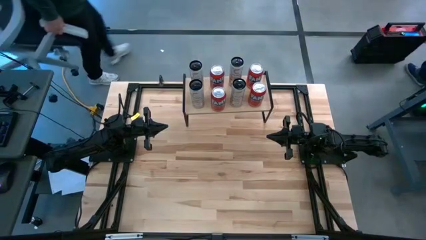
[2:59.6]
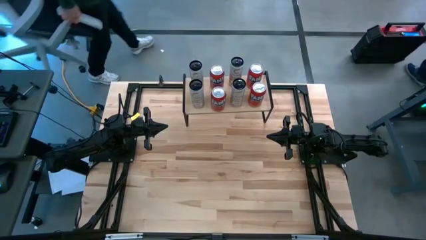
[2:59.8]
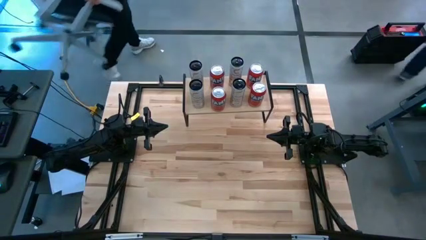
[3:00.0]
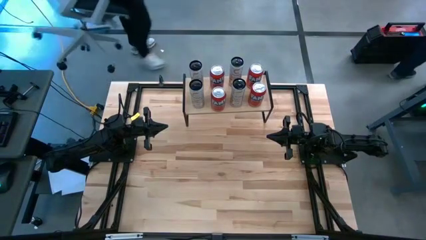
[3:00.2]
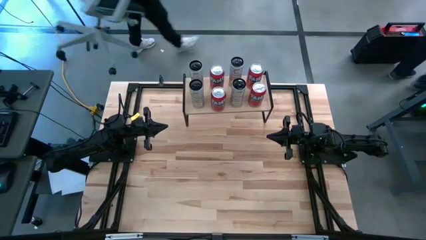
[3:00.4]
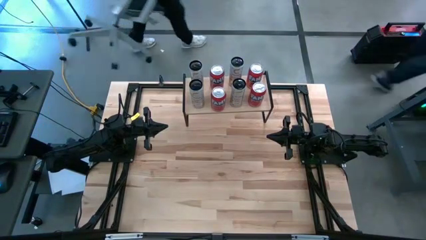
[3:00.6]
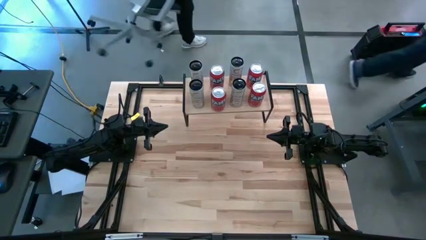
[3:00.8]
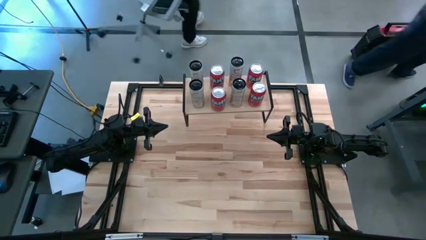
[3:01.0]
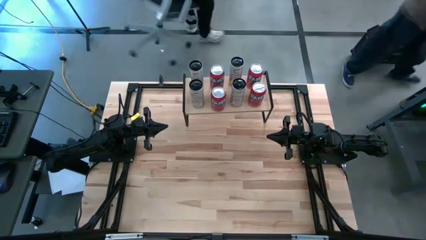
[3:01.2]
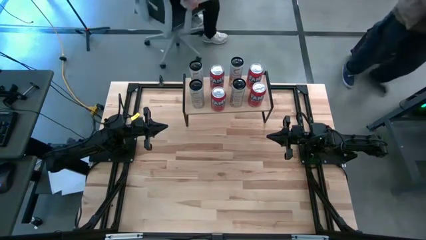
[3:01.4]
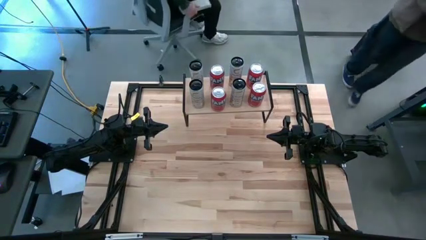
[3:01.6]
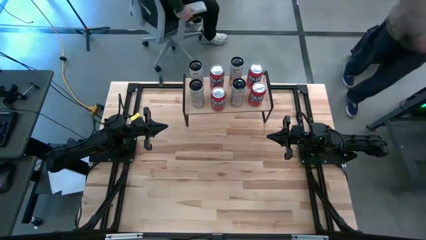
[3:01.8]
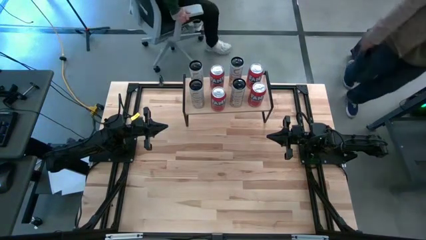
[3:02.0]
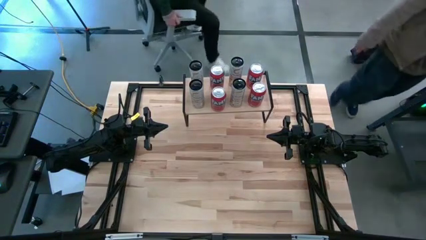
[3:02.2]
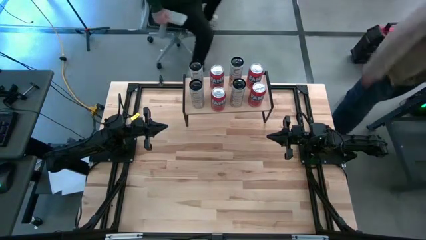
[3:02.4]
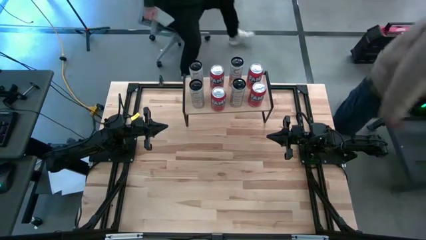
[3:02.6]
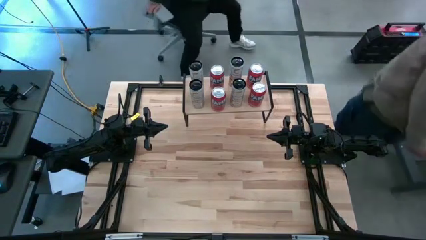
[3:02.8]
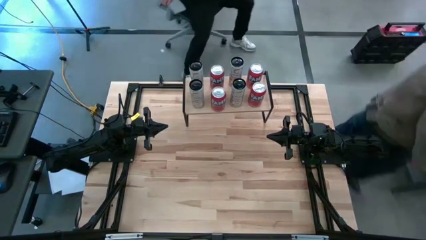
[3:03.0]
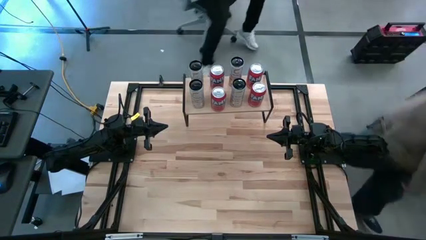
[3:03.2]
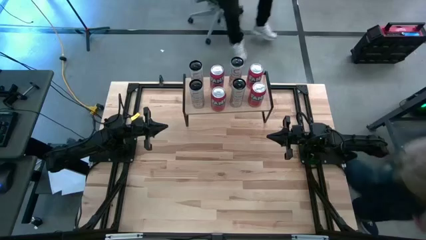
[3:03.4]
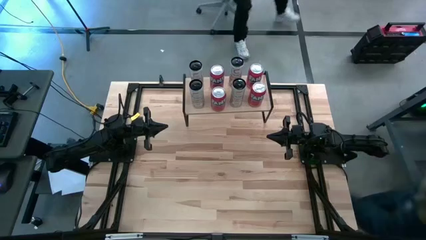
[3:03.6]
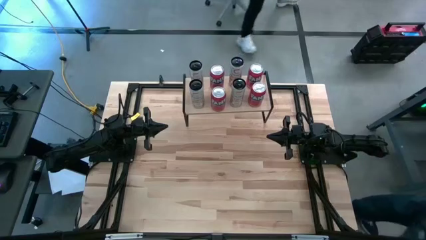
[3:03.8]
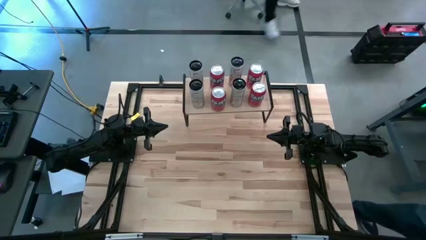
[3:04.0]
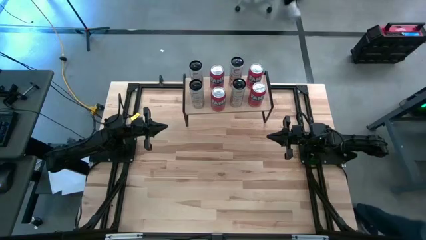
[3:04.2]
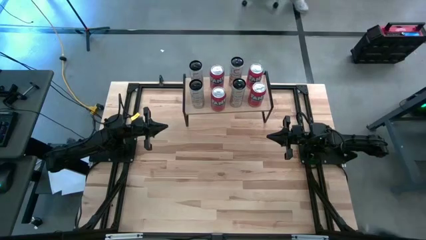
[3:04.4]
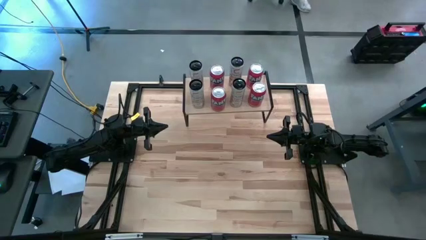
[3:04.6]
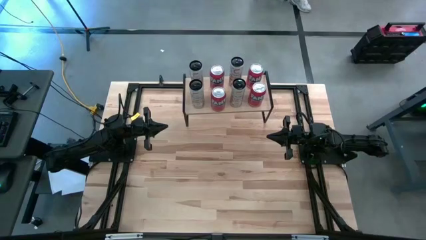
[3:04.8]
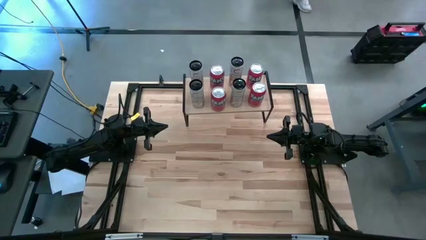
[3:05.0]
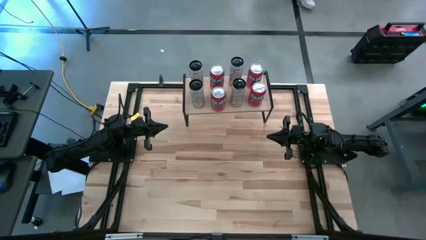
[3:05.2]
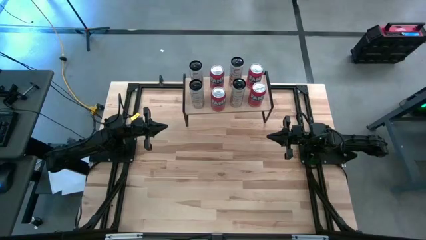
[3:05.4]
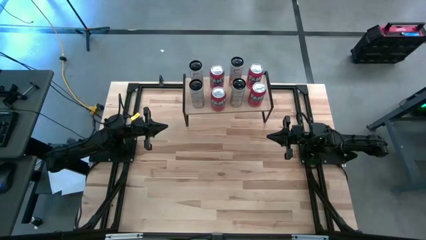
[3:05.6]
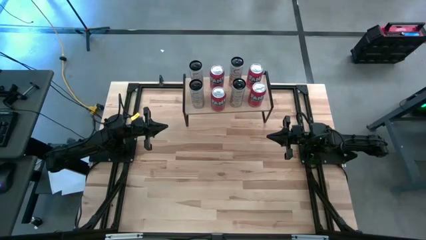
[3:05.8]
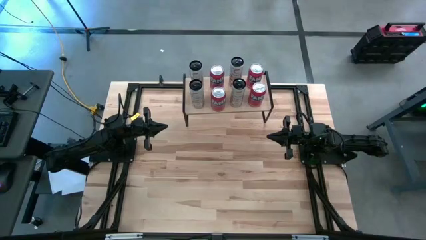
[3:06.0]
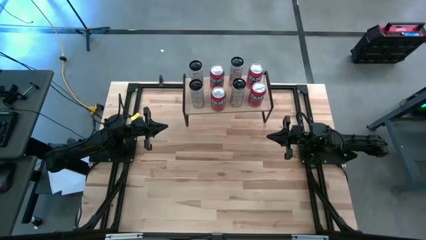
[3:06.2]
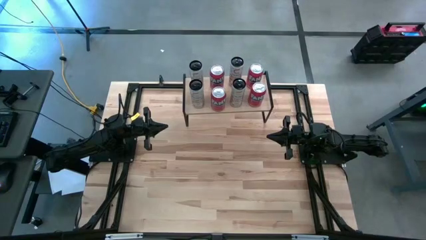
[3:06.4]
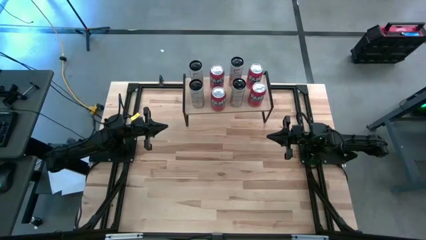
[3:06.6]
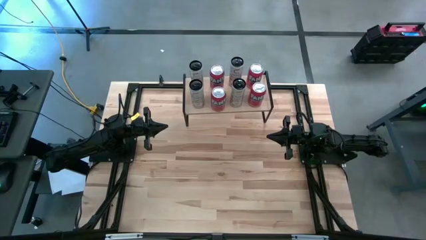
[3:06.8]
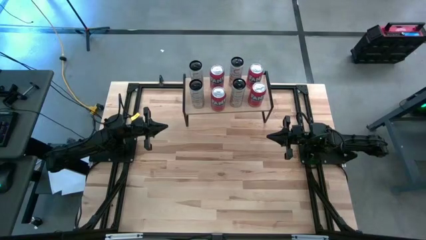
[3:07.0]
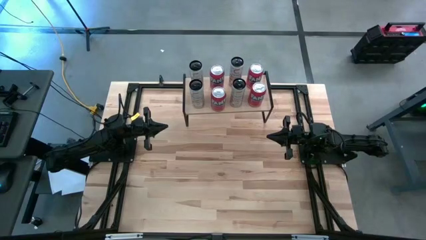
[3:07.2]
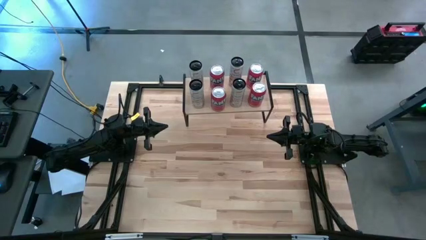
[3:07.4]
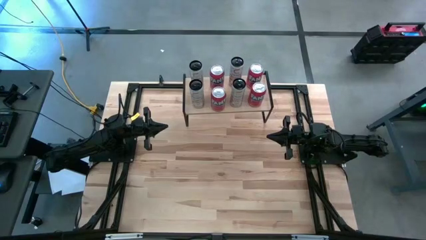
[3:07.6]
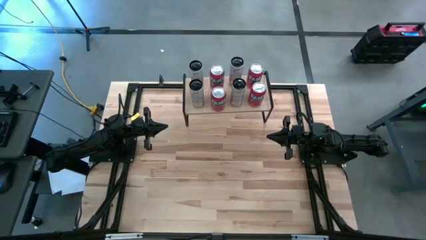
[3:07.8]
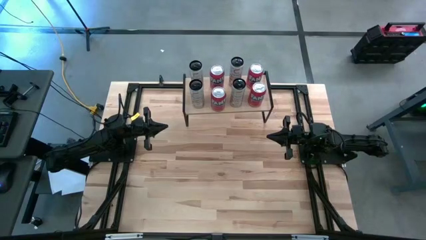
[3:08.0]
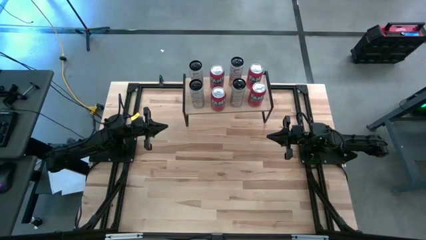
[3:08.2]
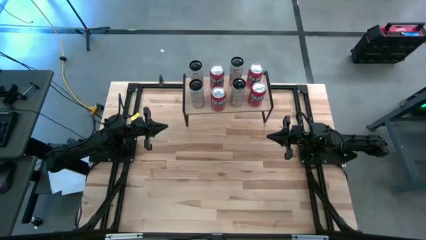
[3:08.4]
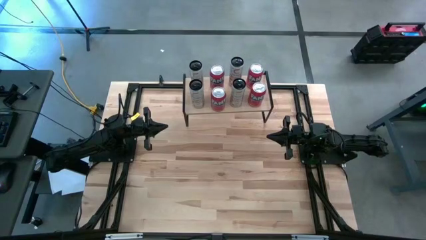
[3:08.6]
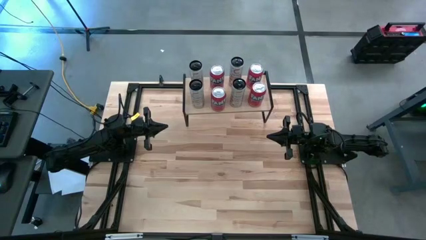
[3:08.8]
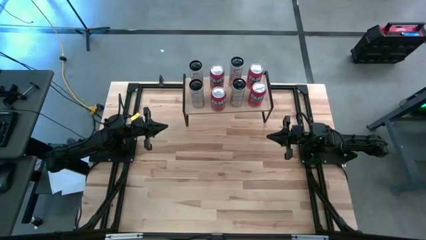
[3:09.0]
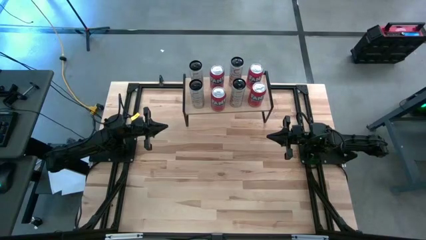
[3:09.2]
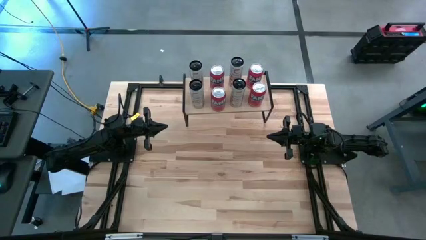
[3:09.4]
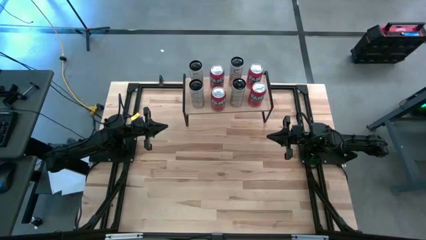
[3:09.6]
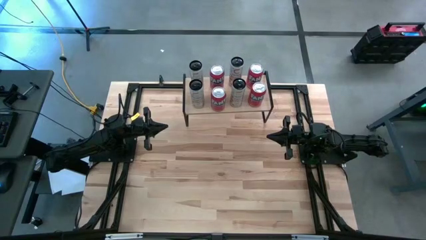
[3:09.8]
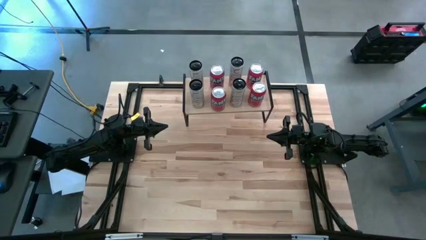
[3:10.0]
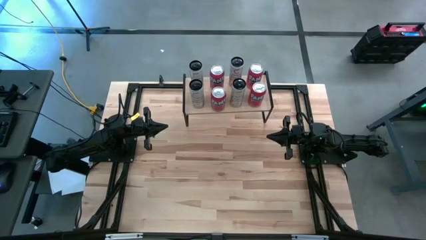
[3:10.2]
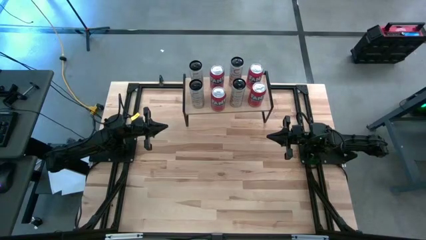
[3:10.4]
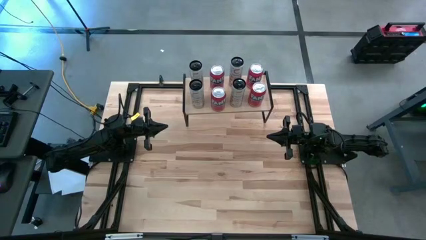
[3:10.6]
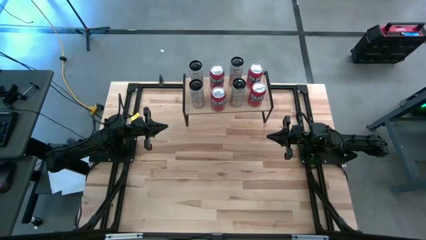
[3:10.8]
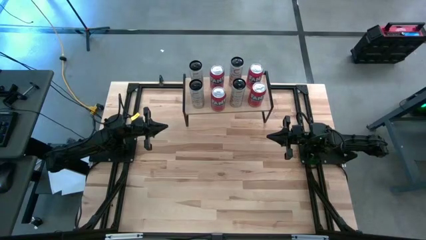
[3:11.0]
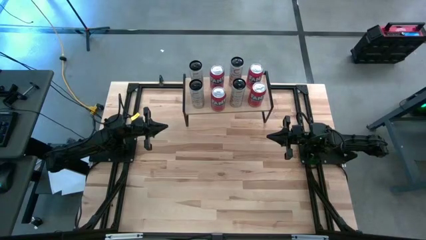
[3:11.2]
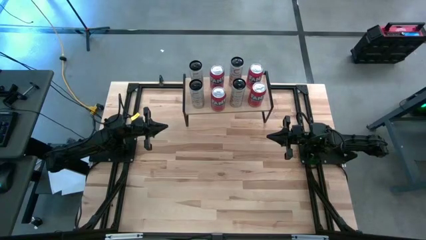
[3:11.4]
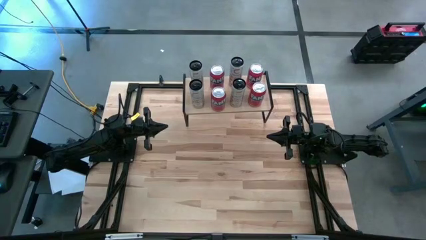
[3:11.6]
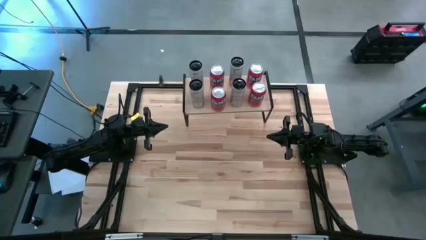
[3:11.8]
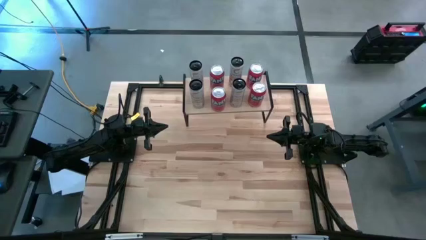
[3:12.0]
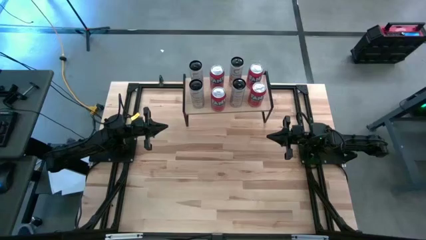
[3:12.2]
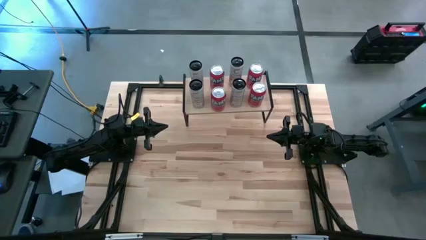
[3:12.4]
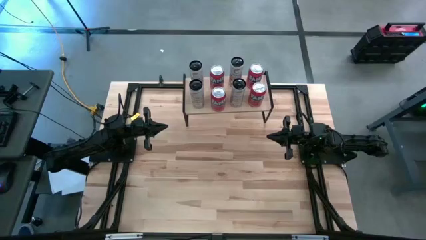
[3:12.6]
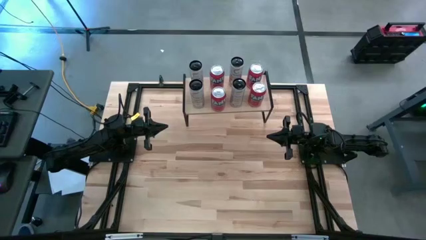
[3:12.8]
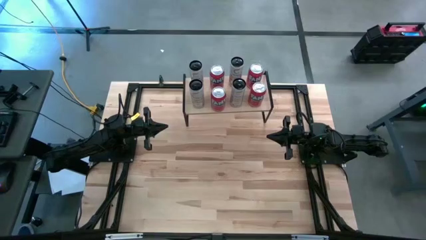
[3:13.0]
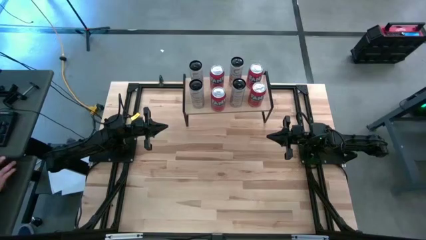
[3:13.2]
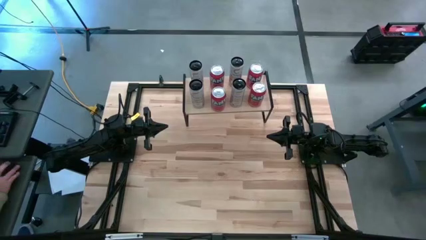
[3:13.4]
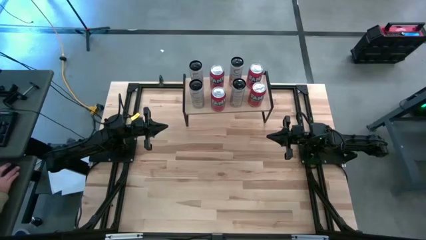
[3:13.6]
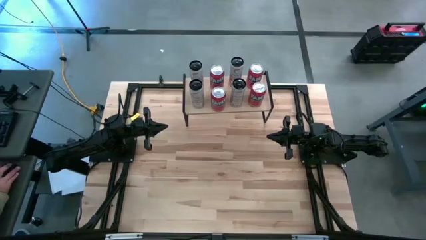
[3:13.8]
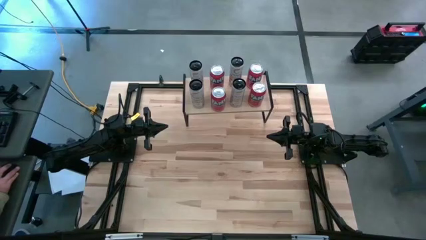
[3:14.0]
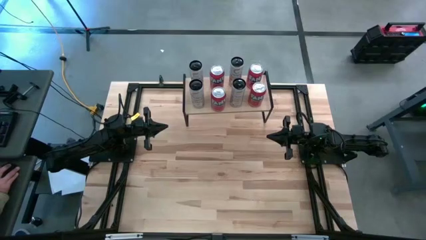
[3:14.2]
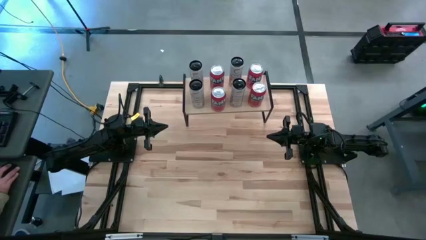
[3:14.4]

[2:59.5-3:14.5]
Task: Place canned beverage on shelf
Return to Home Position
